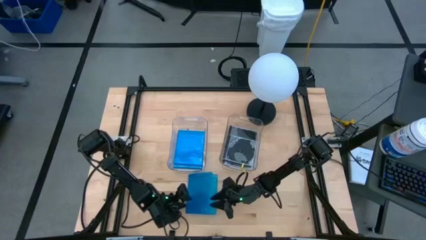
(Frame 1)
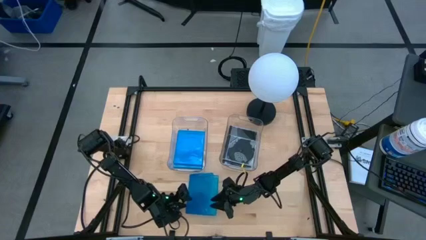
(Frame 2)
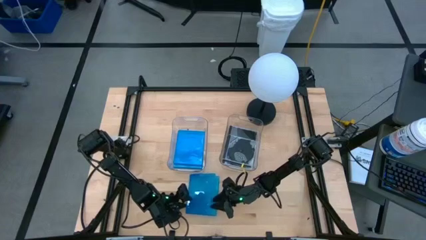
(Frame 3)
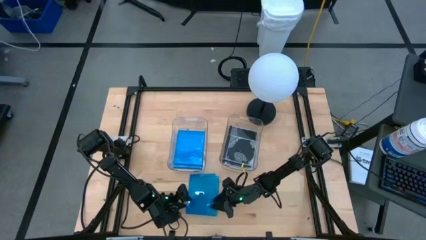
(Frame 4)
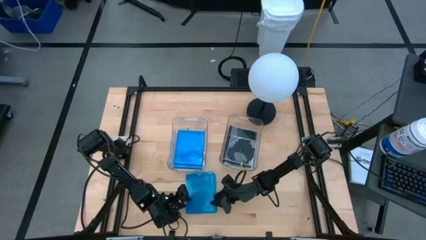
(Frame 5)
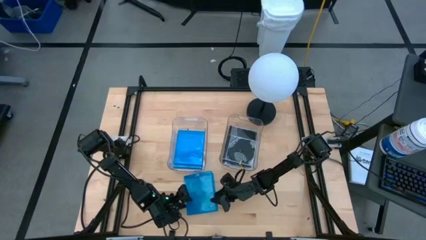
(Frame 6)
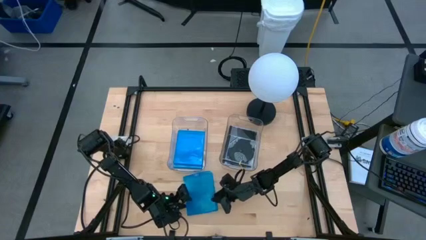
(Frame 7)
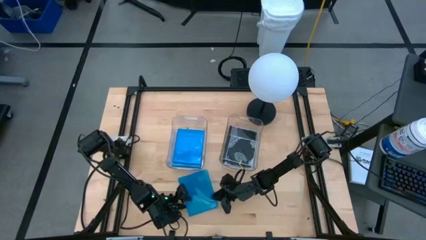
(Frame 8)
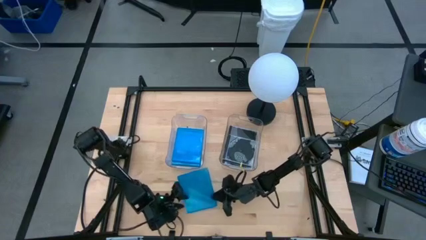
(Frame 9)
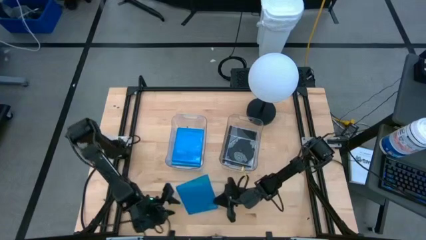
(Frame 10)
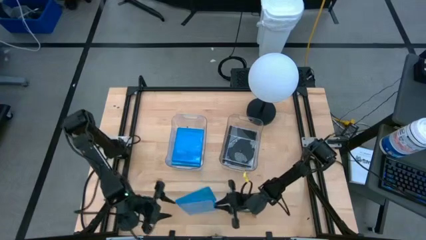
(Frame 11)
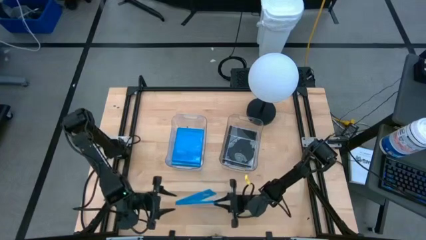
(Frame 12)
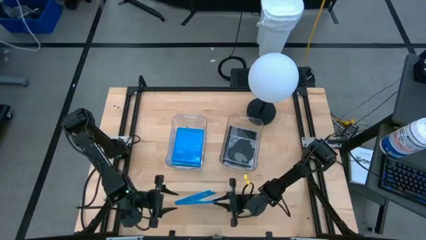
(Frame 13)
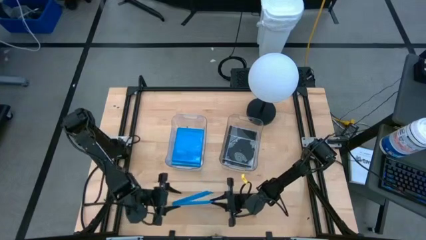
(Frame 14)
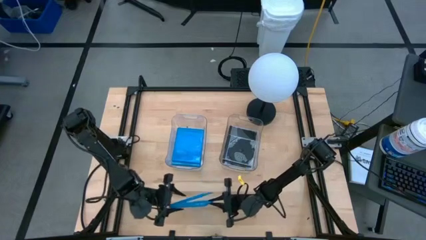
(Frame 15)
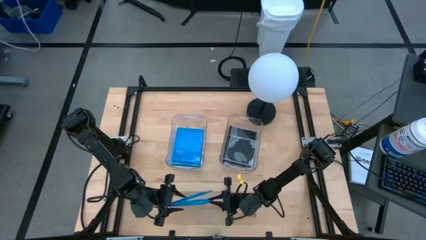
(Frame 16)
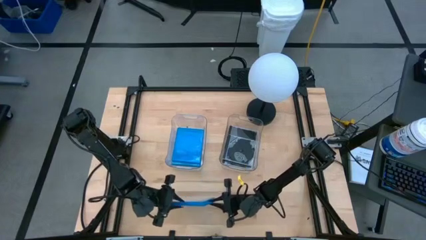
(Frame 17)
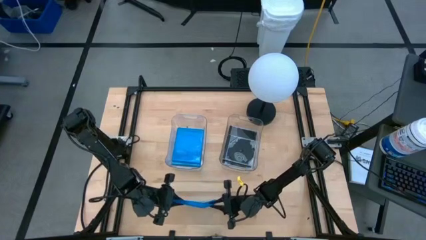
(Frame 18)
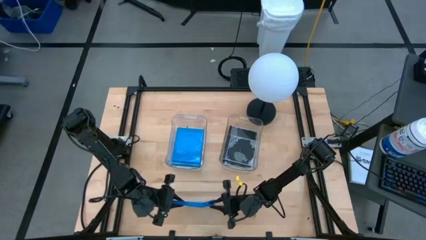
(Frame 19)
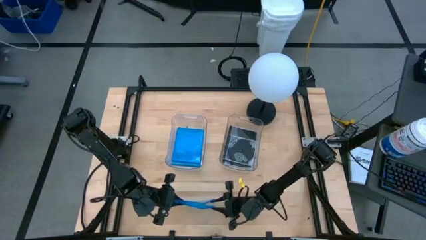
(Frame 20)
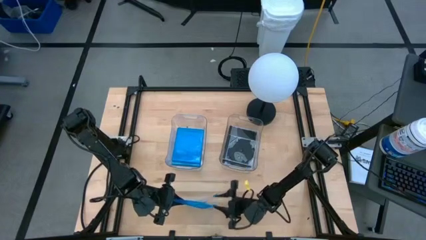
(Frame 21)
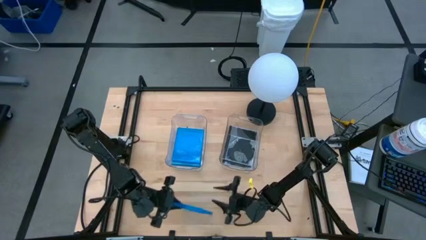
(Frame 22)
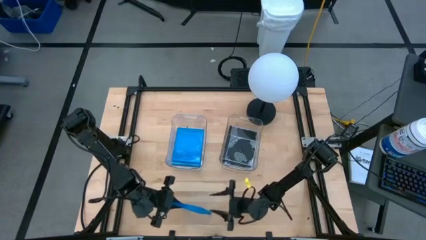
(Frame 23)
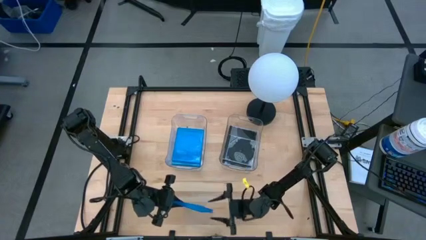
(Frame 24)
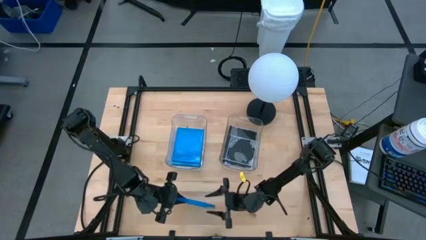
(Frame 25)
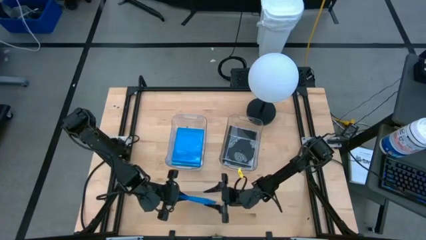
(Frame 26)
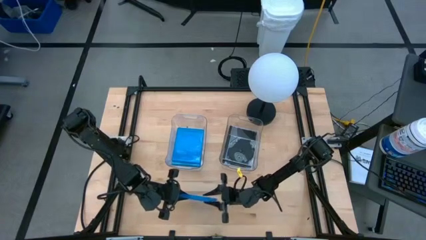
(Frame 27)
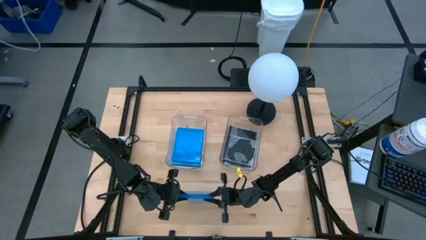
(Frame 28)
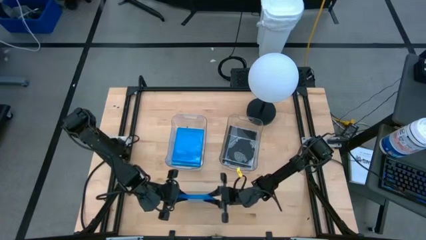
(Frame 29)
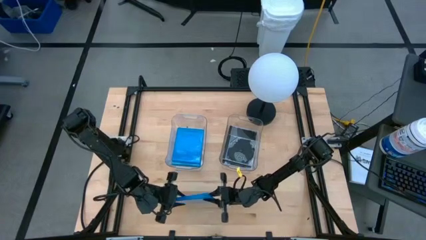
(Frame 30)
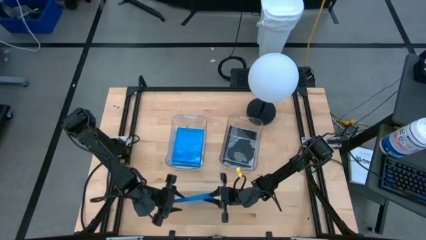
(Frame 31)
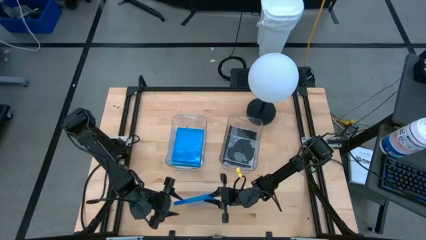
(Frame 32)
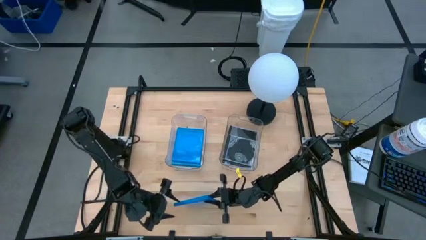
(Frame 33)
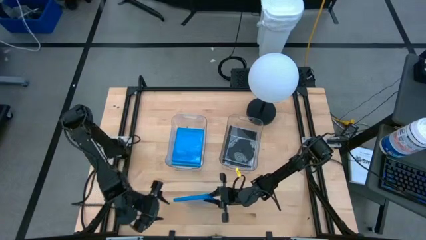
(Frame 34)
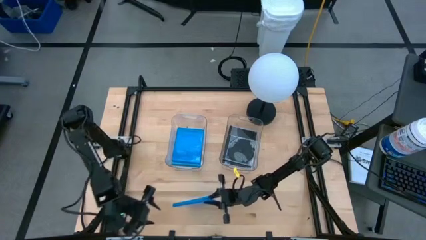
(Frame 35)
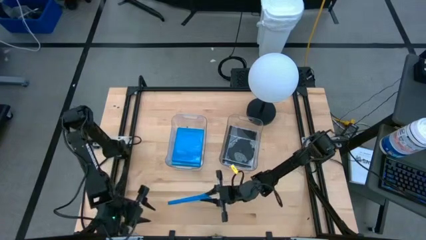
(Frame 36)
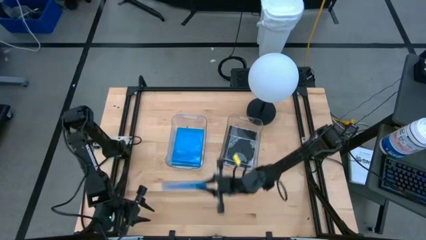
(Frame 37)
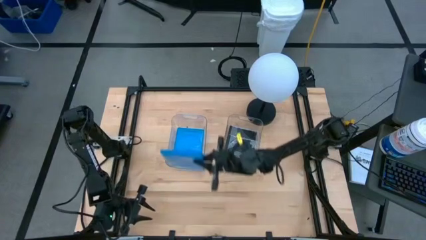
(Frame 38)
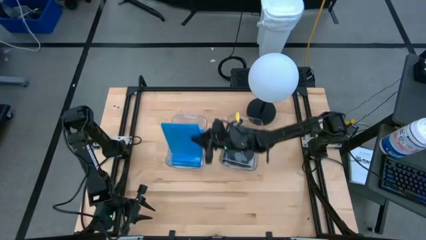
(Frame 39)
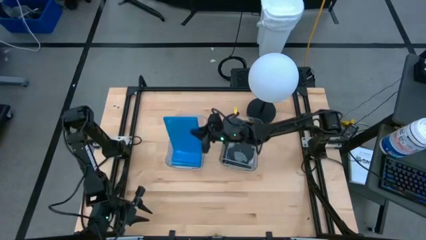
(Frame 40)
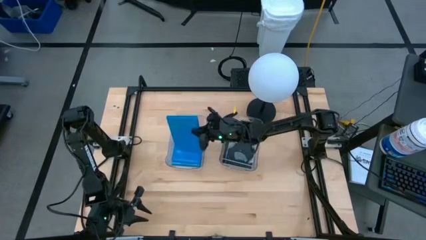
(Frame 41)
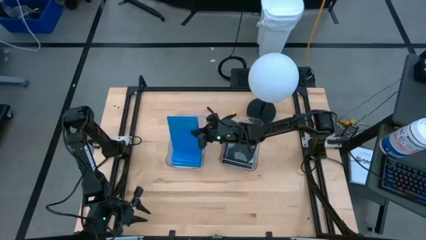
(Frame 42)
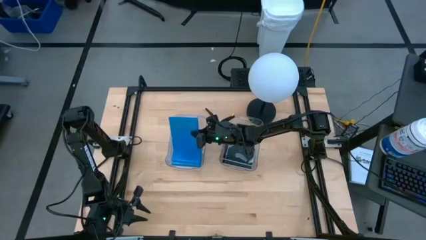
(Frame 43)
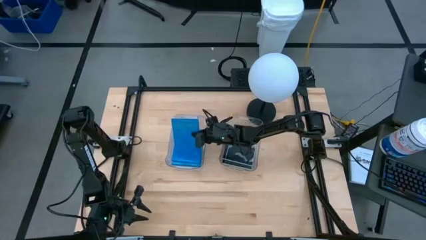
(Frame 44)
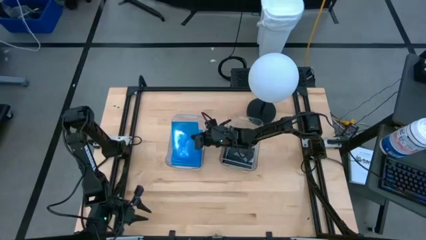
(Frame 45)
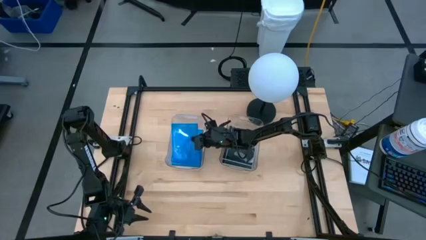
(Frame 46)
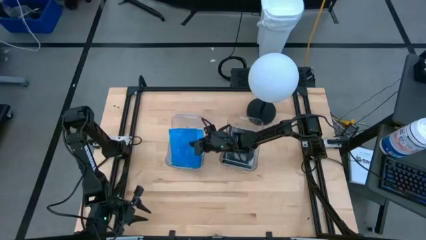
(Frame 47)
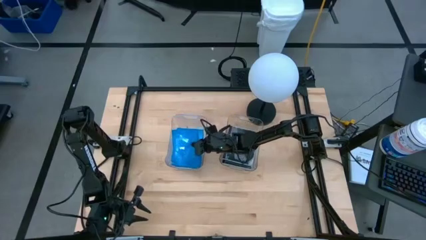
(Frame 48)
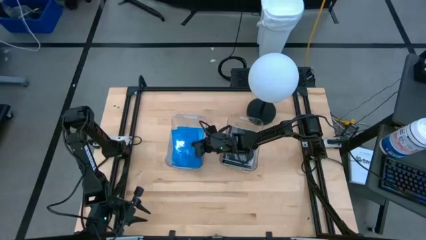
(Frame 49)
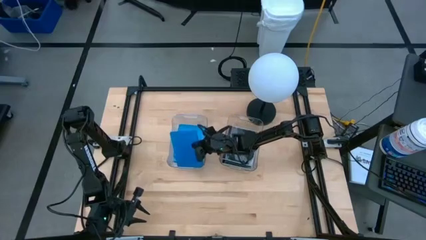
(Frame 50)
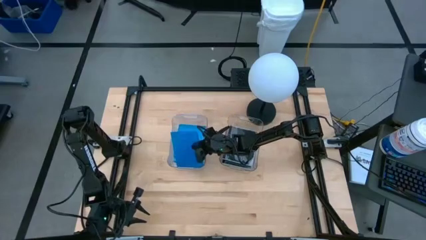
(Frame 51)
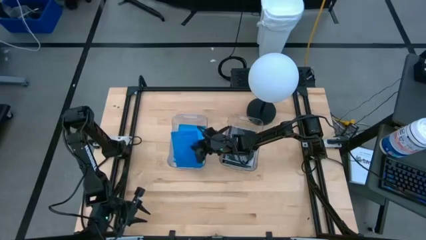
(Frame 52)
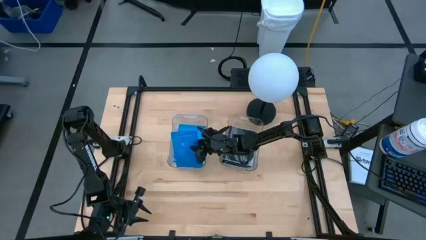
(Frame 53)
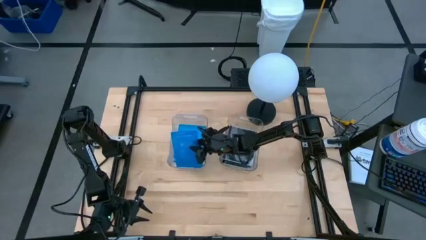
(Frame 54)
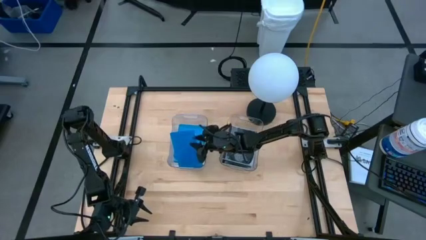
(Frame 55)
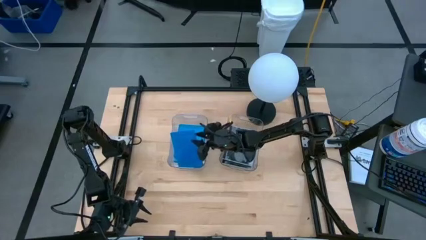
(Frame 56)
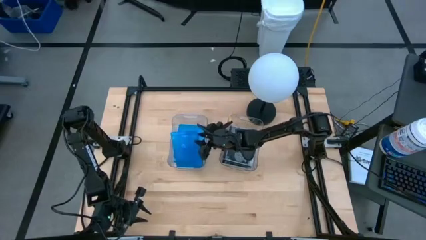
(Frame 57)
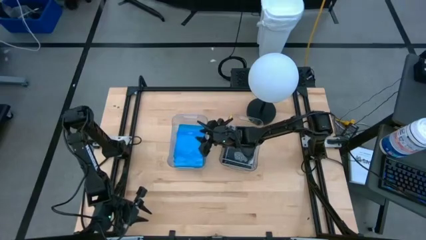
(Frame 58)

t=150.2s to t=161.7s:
Task: Pick & place jewel cases by type
Put the blue CD case into the left transparent bin

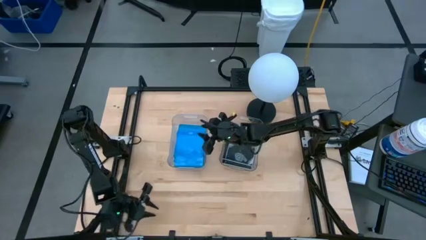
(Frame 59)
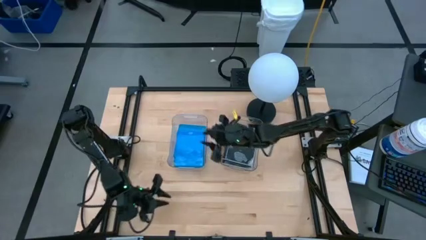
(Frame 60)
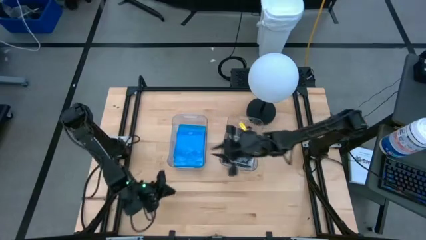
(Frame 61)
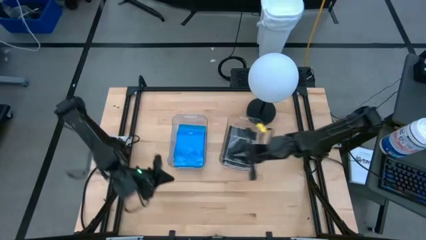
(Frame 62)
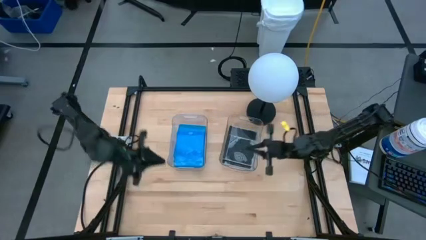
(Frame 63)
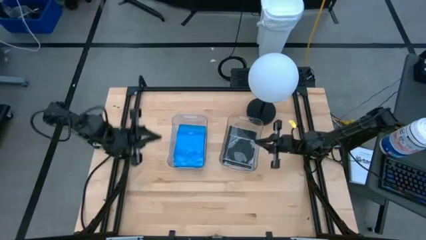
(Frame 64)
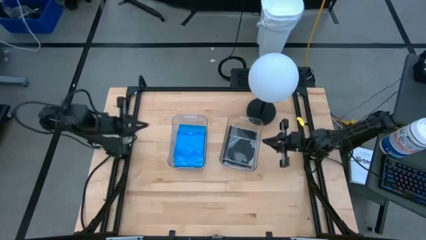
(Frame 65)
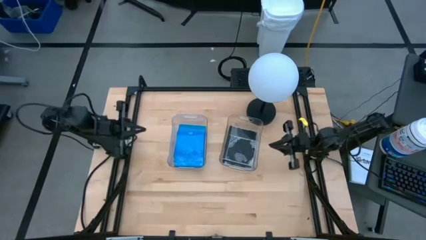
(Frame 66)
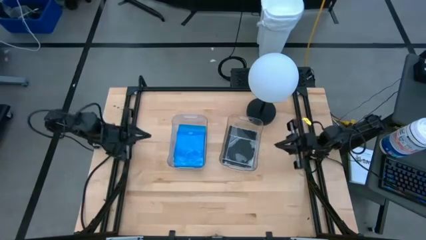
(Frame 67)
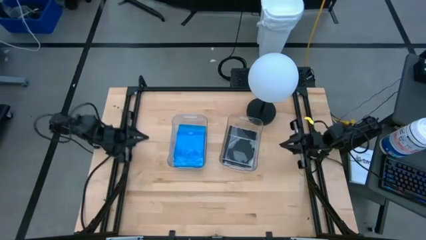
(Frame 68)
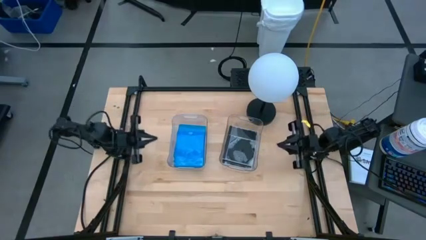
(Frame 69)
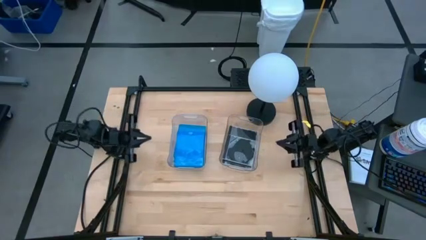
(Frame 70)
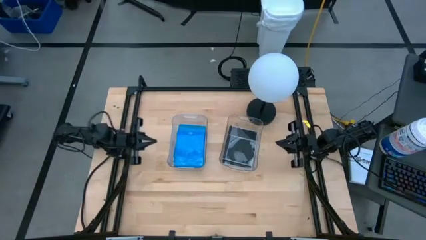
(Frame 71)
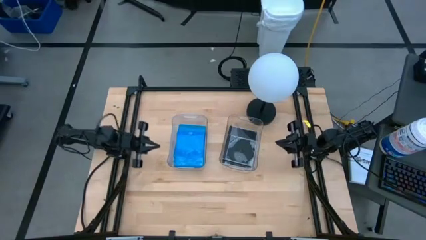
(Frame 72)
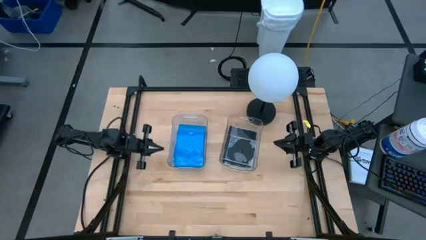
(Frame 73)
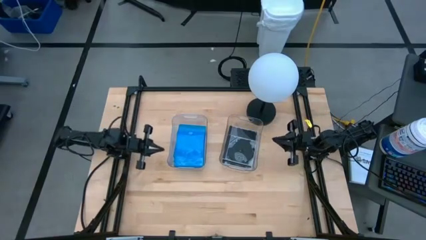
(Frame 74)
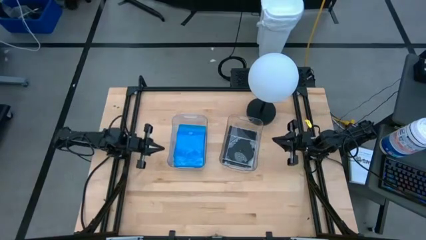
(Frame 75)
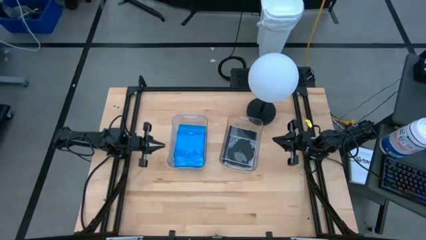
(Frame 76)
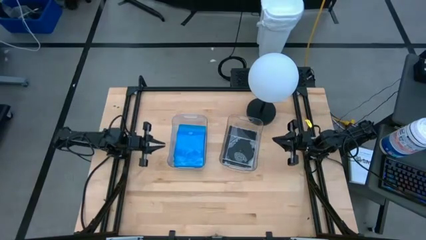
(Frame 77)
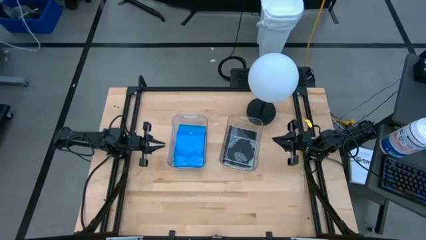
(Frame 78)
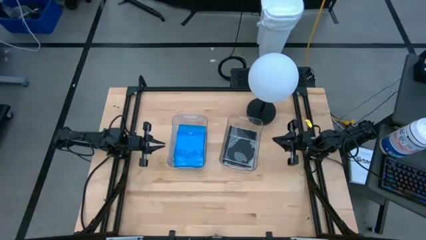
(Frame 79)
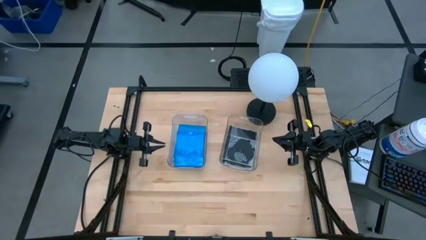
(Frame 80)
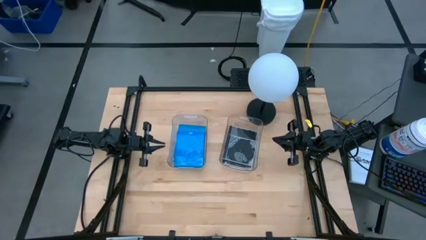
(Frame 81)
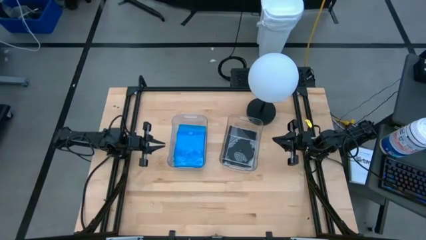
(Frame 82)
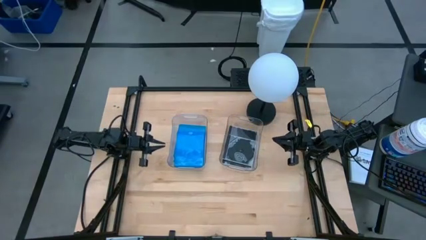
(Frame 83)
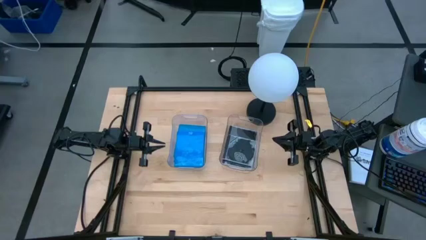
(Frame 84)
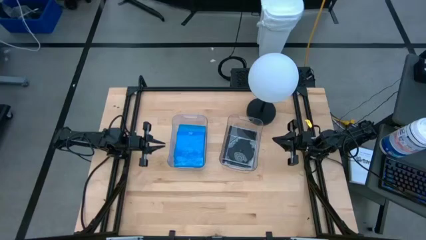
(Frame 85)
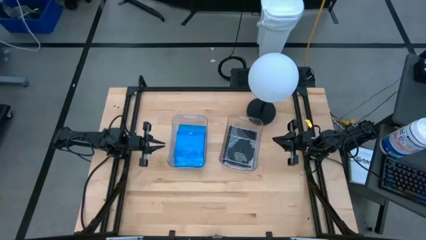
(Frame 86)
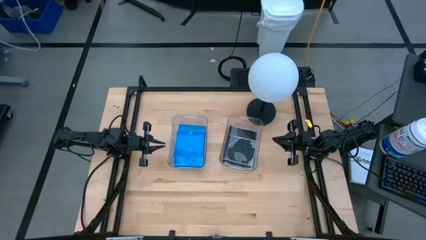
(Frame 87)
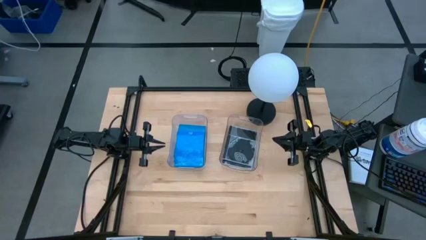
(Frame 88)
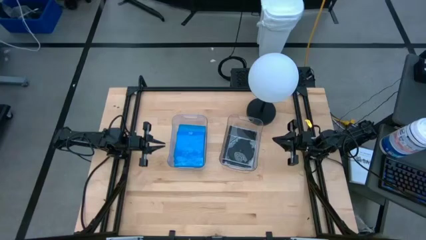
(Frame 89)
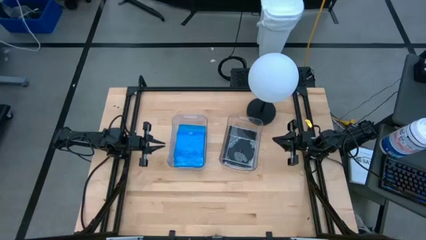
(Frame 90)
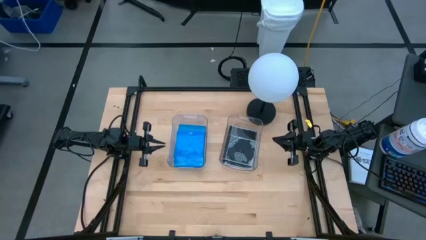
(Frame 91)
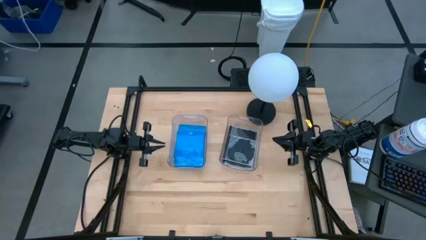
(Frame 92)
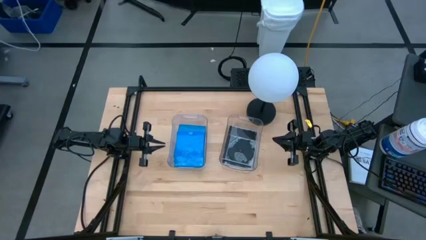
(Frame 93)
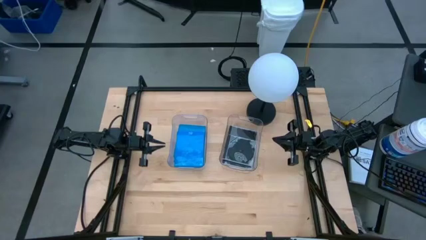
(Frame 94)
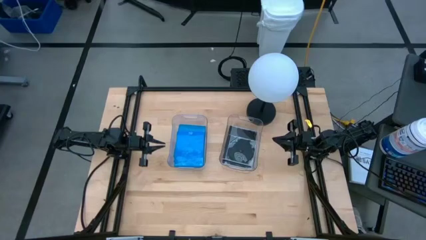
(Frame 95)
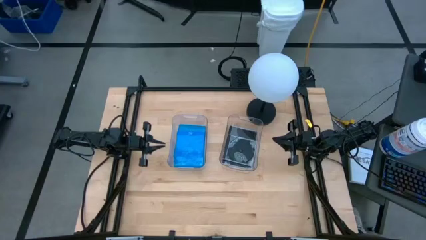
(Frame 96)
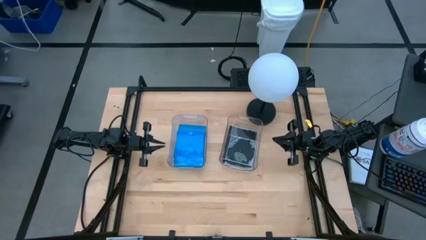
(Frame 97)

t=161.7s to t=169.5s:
Return to Home Position
